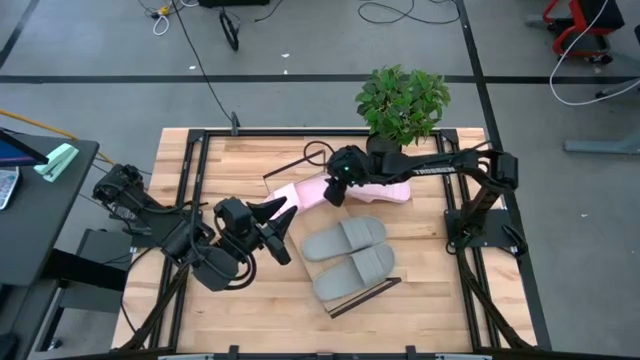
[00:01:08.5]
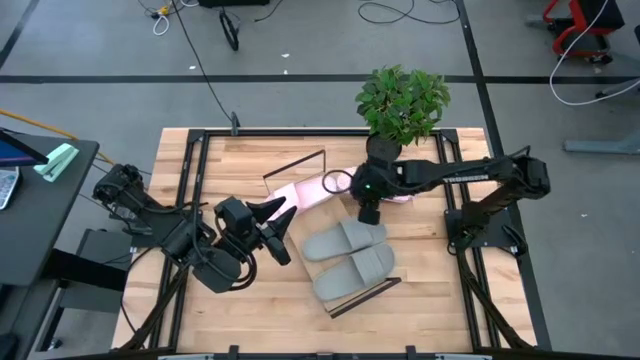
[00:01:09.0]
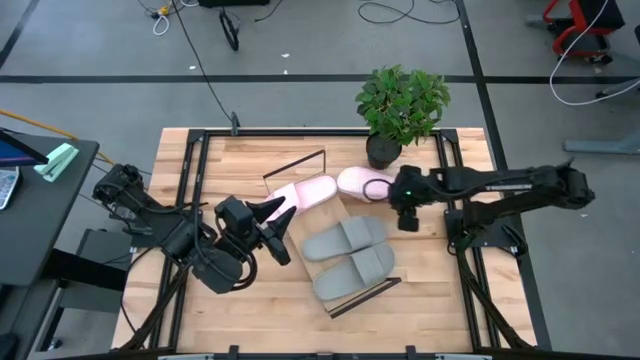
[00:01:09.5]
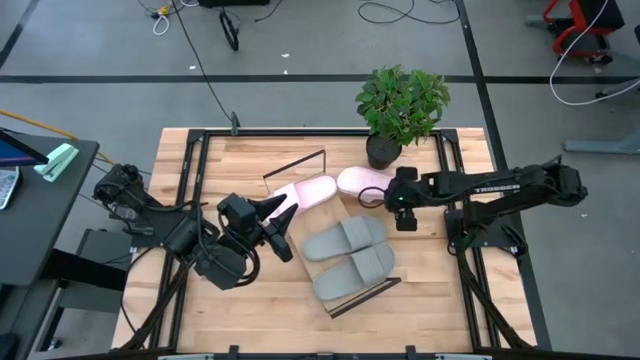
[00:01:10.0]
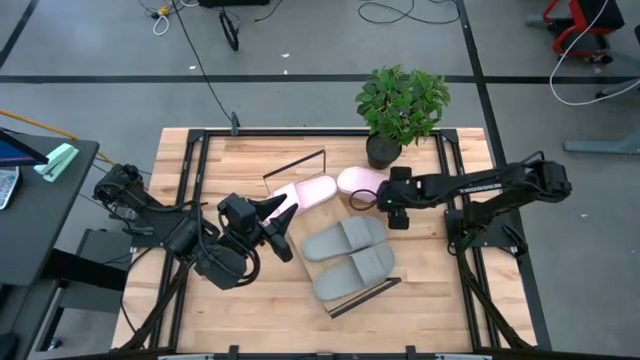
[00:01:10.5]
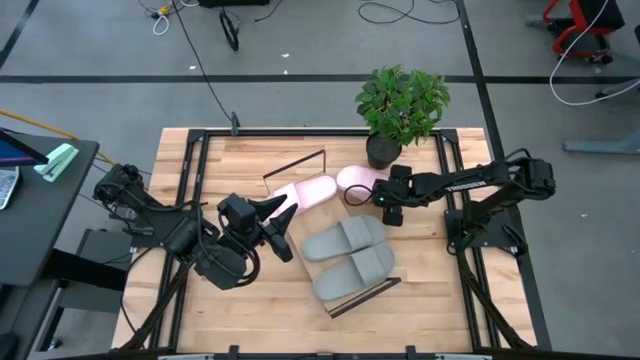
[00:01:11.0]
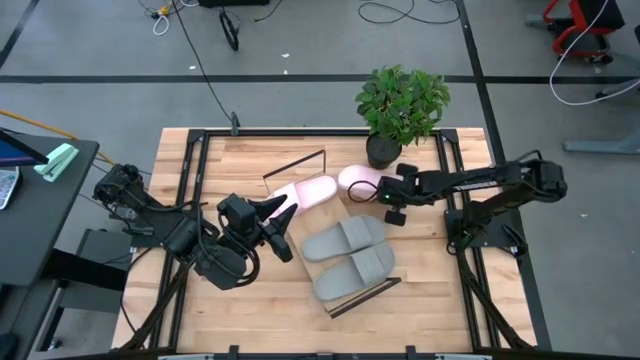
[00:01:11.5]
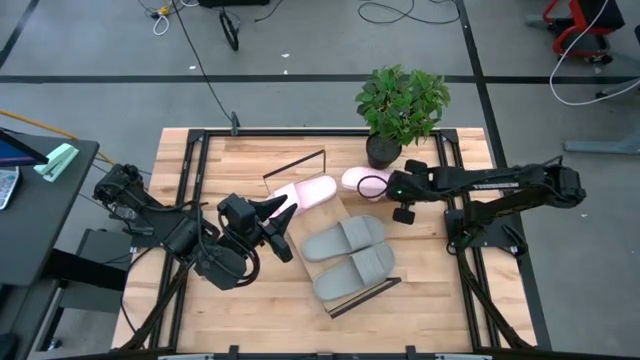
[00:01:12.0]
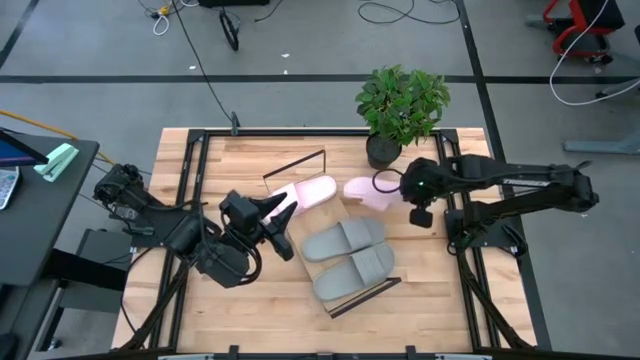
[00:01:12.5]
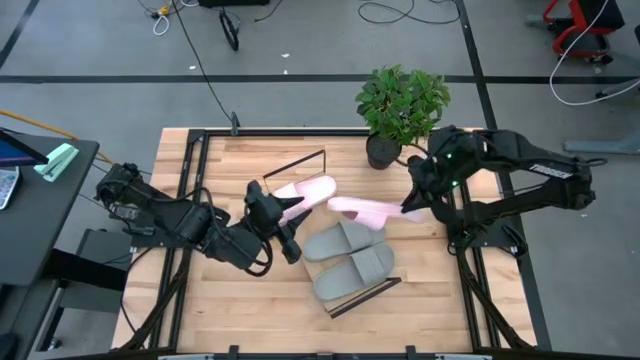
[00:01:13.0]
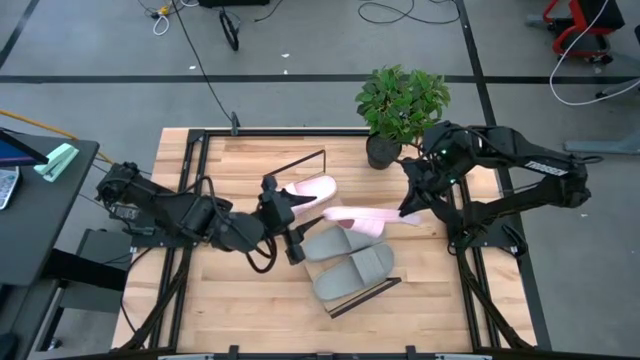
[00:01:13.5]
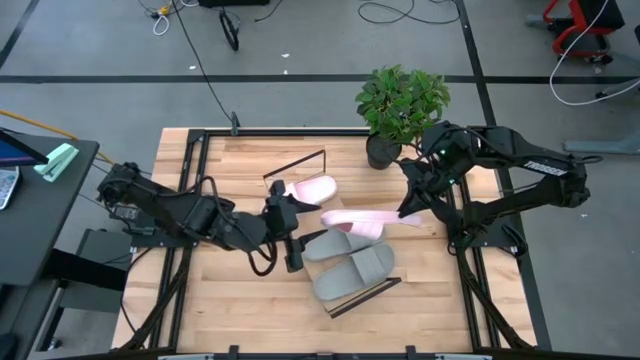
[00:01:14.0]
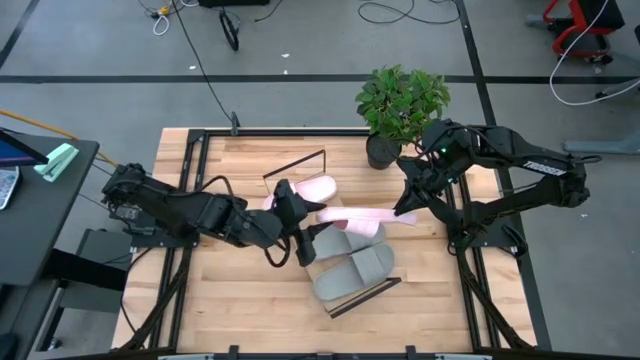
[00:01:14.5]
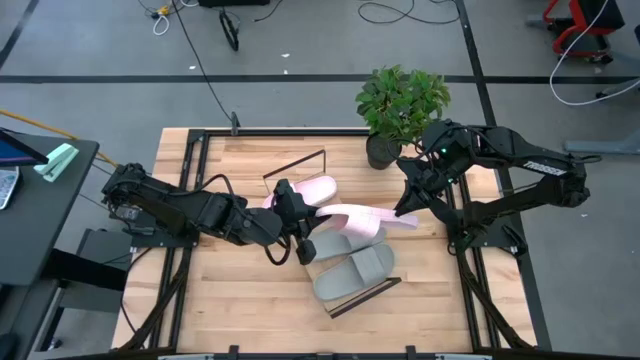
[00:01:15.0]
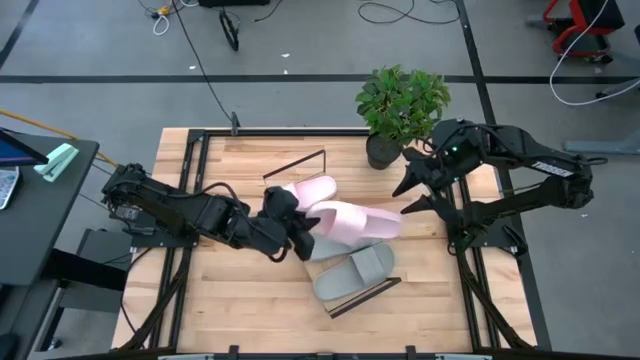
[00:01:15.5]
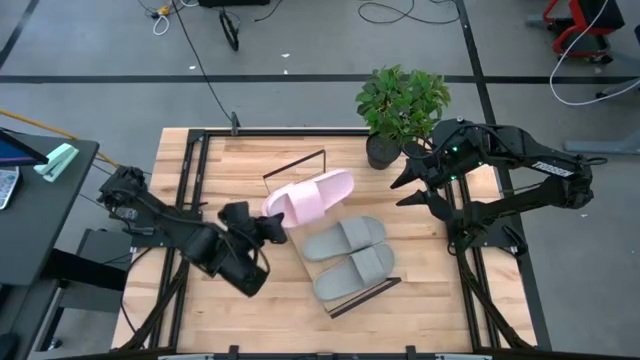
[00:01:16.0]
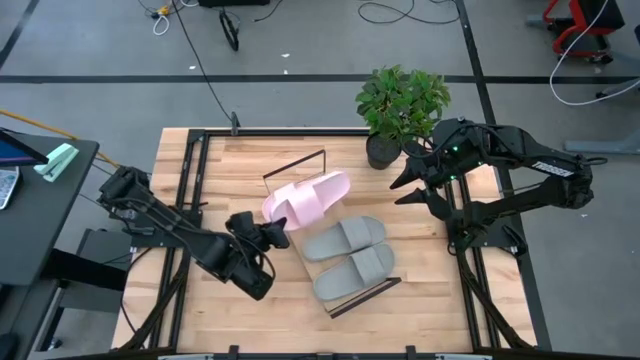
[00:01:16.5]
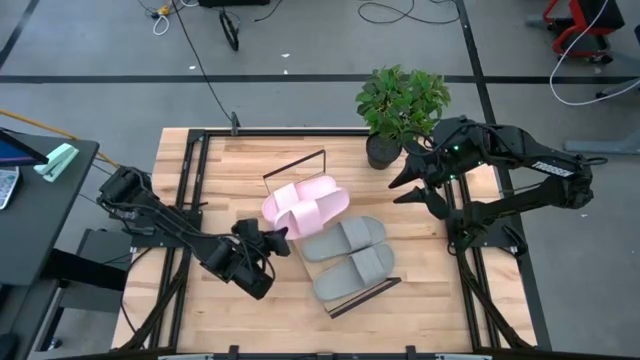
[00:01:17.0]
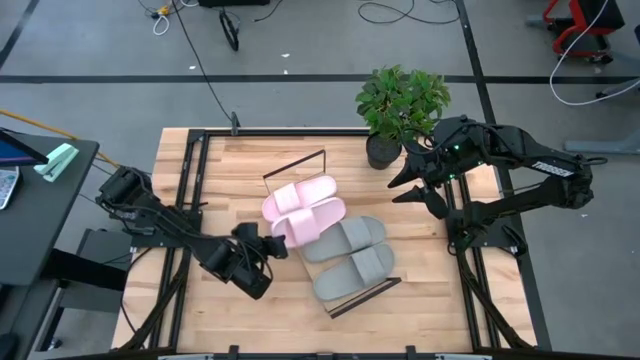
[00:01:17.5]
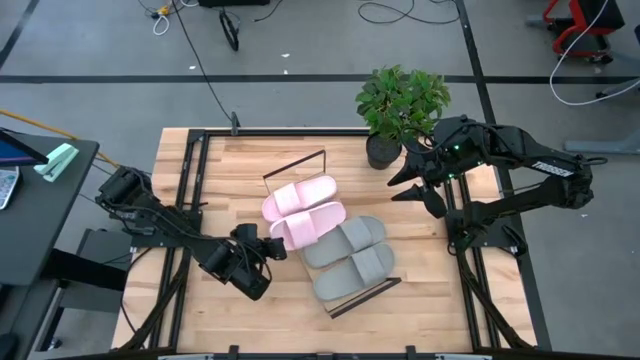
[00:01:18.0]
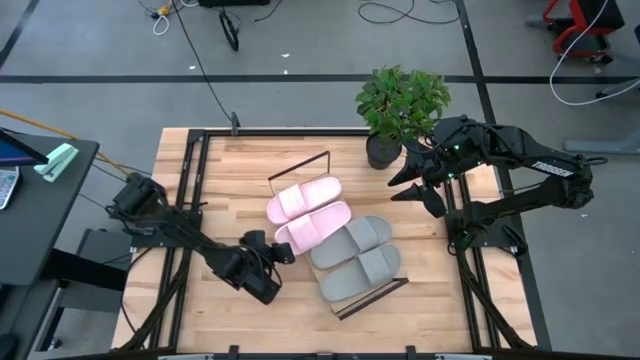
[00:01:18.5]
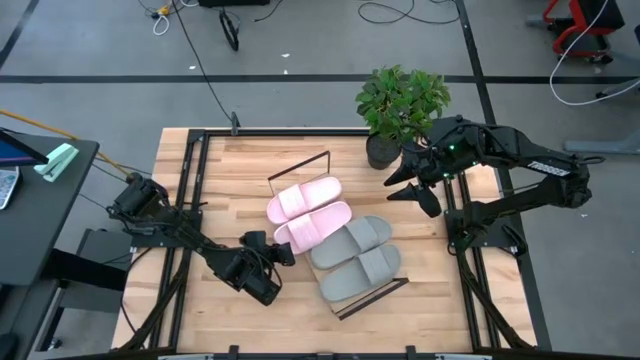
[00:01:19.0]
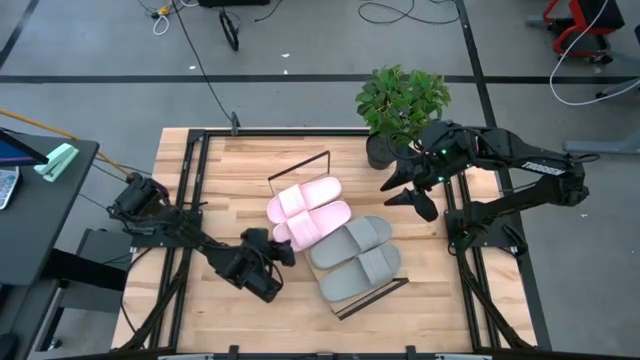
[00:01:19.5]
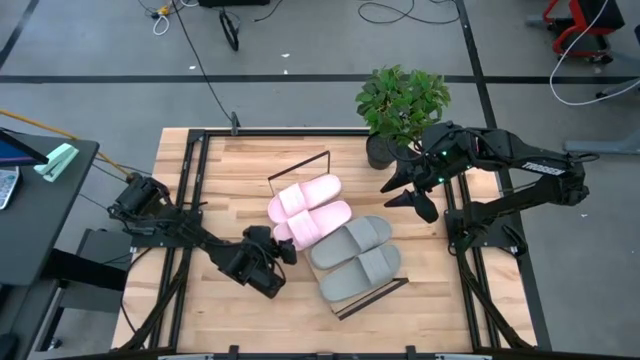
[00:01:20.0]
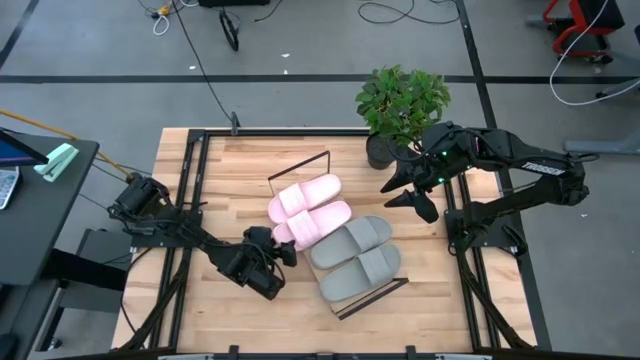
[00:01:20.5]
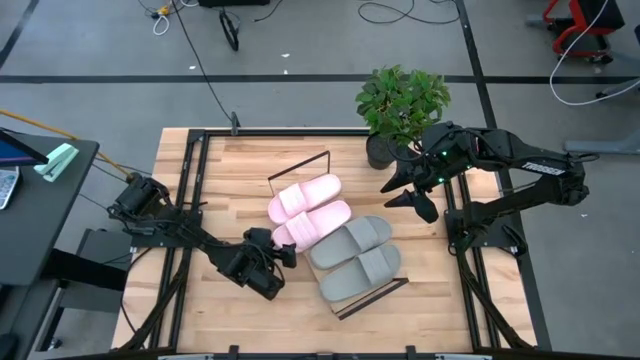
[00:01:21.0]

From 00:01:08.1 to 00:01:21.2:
Task: Pick and place slides into the shelf
Put the pink slide on the shelf

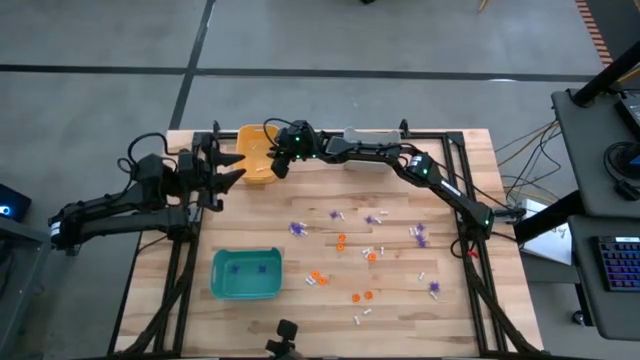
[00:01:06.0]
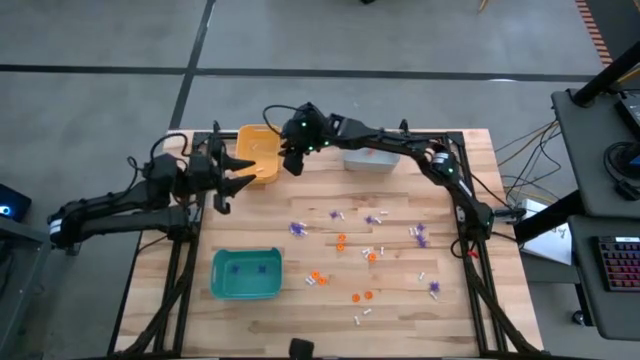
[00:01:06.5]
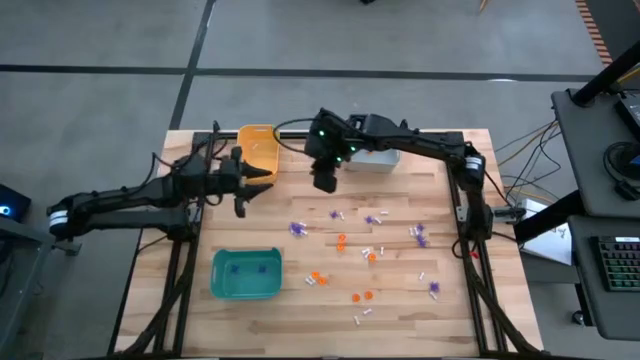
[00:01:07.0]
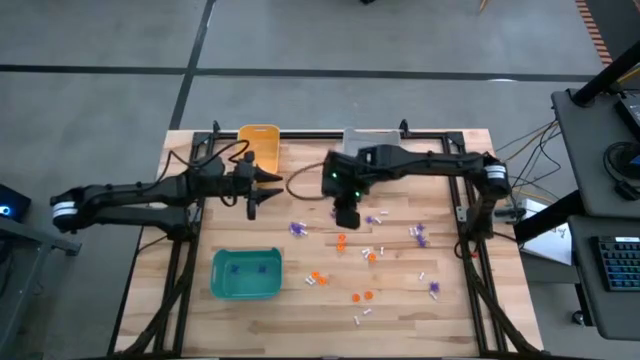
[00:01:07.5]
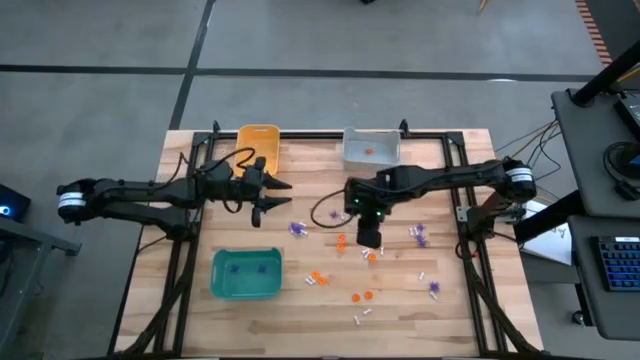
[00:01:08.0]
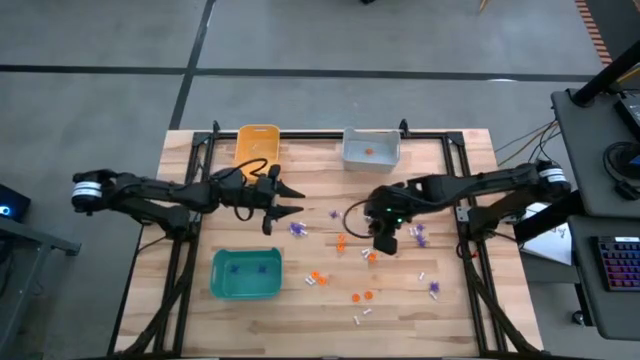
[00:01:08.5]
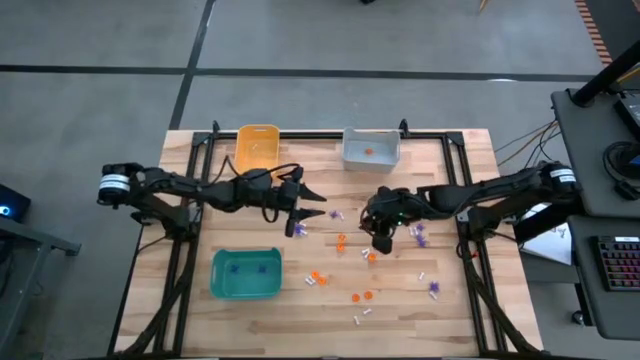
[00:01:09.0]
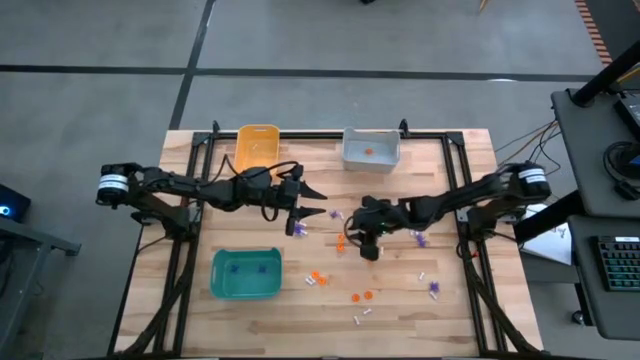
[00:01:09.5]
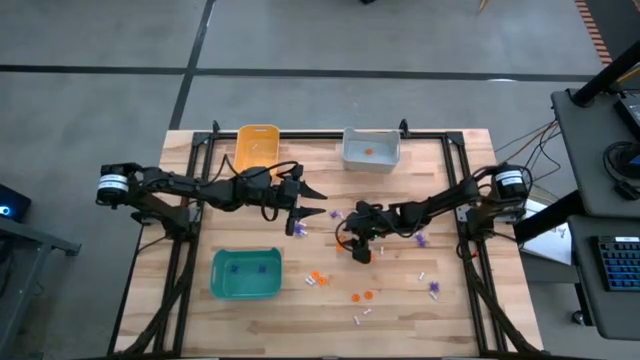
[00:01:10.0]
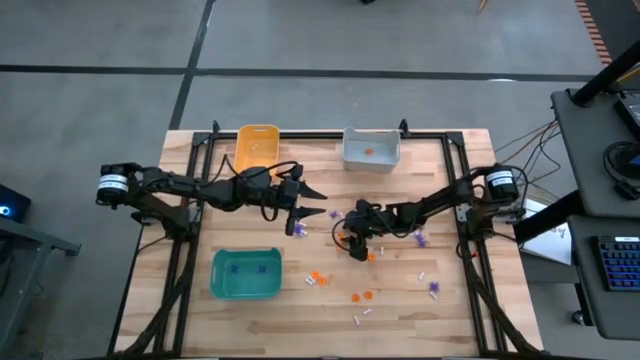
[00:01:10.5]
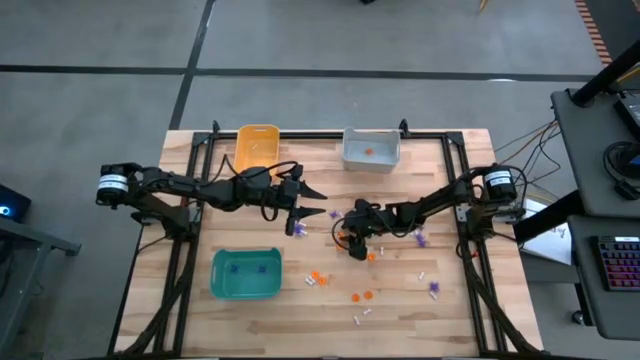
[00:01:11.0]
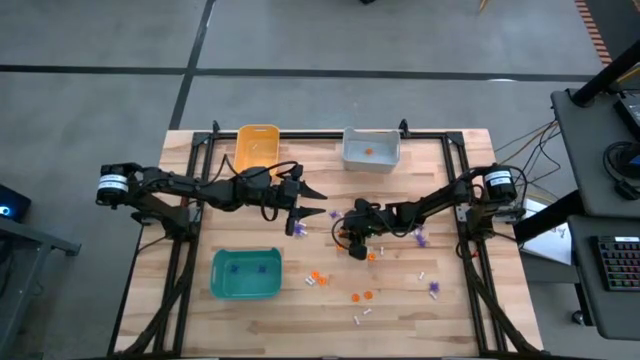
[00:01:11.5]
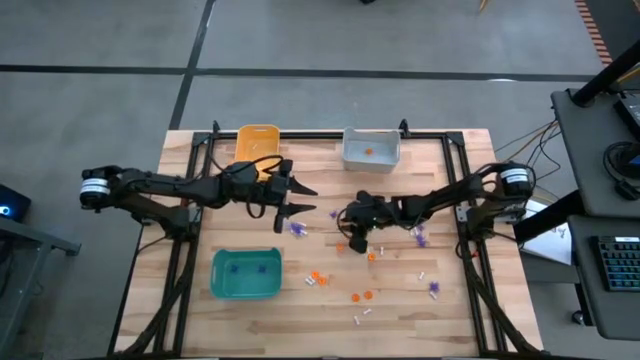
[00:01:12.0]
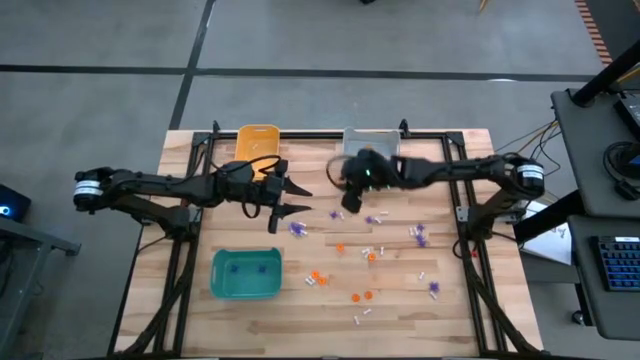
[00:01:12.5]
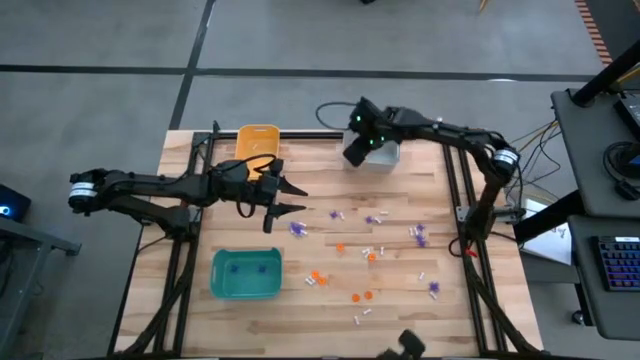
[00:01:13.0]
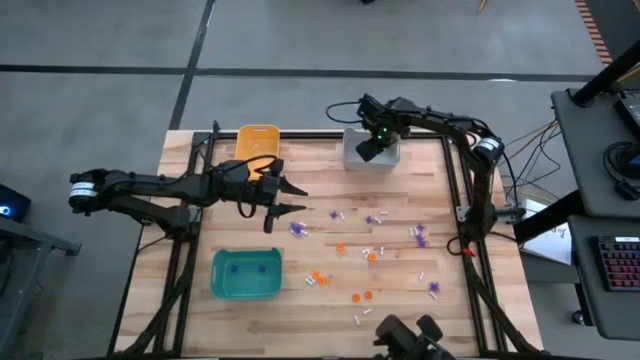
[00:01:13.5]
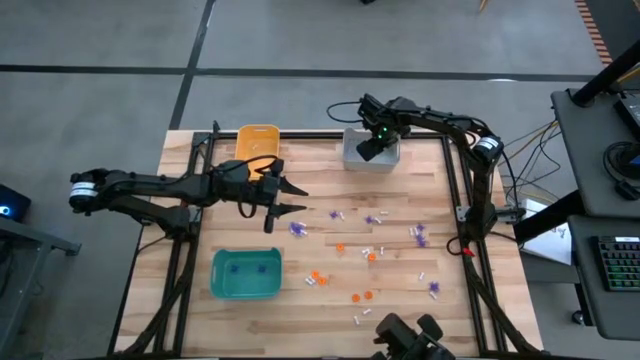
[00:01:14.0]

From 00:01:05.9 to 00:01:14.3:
Task: Sort Halloween decoration
Put the orange pumpkin toy into the gray bin
